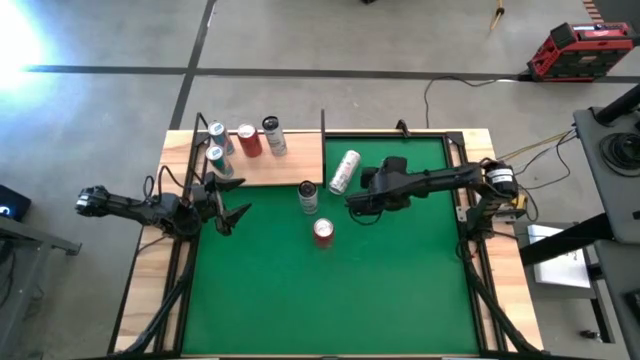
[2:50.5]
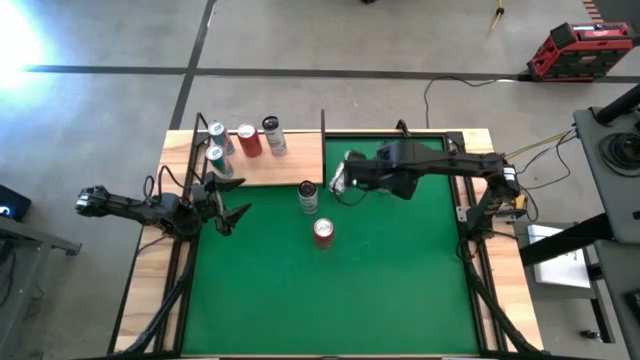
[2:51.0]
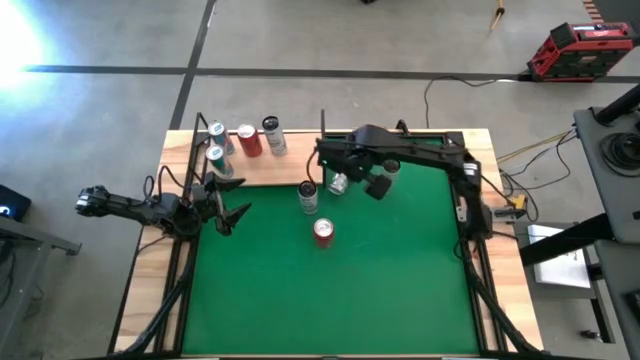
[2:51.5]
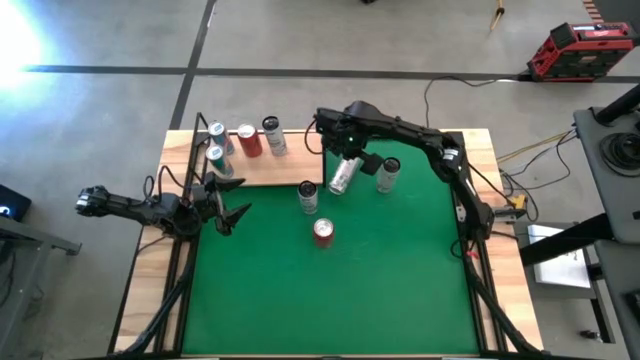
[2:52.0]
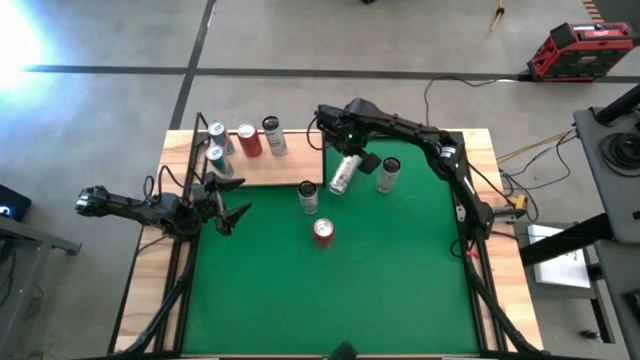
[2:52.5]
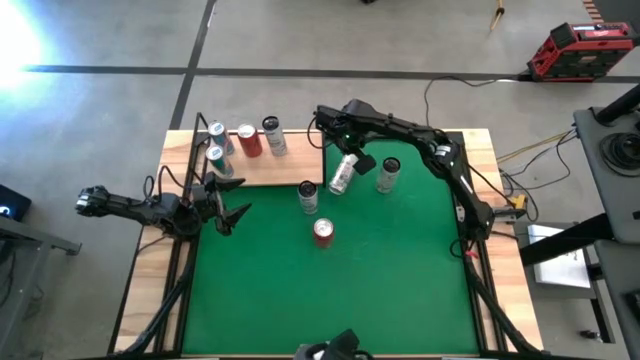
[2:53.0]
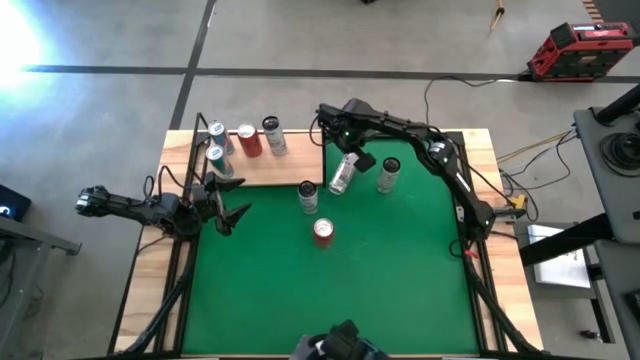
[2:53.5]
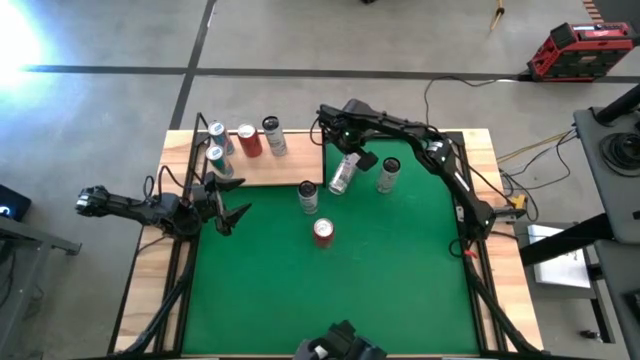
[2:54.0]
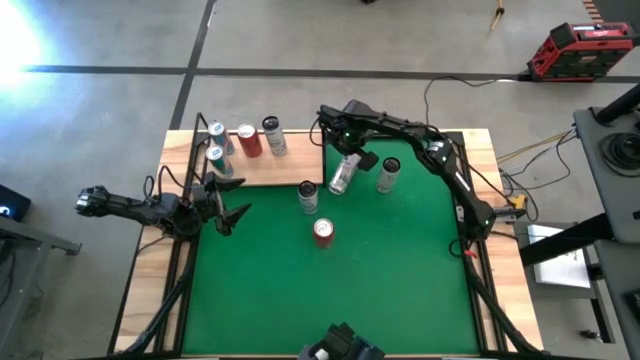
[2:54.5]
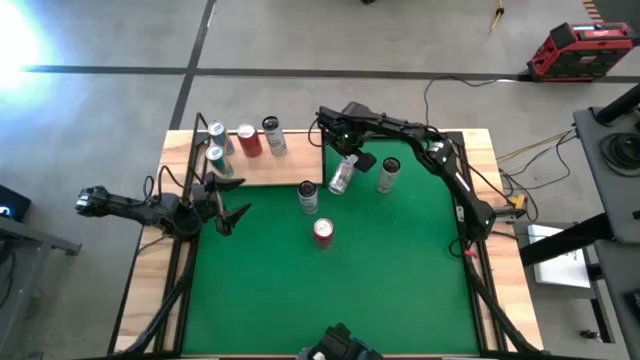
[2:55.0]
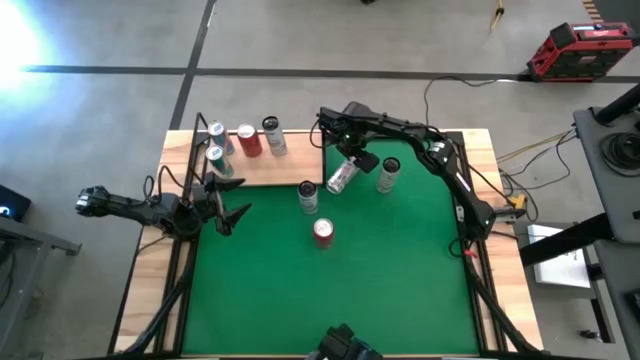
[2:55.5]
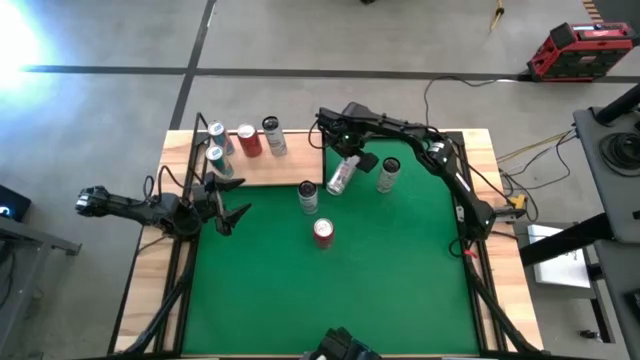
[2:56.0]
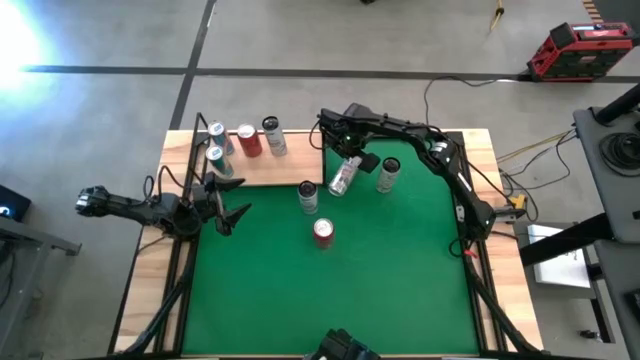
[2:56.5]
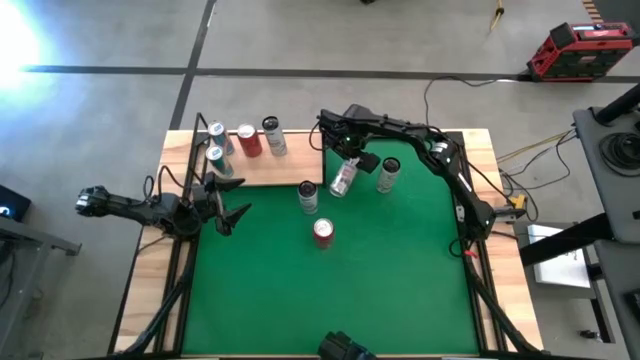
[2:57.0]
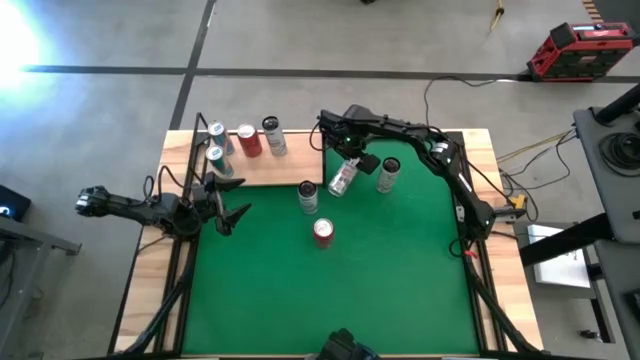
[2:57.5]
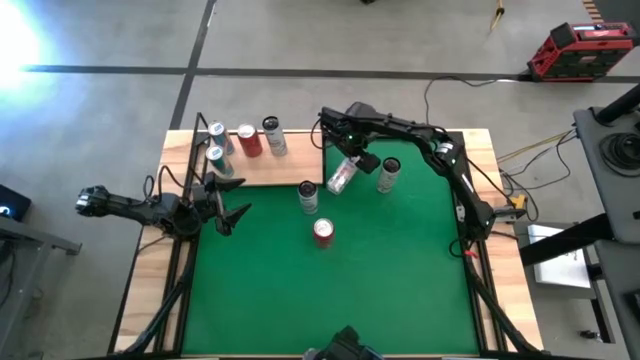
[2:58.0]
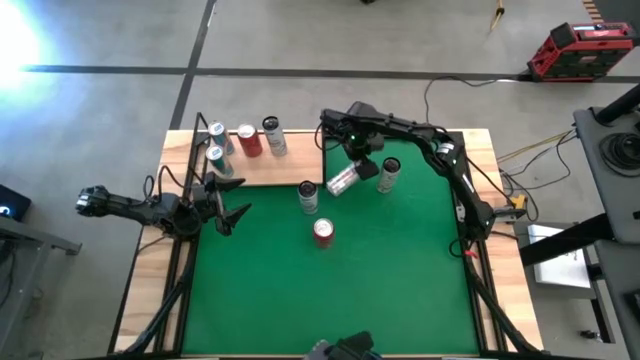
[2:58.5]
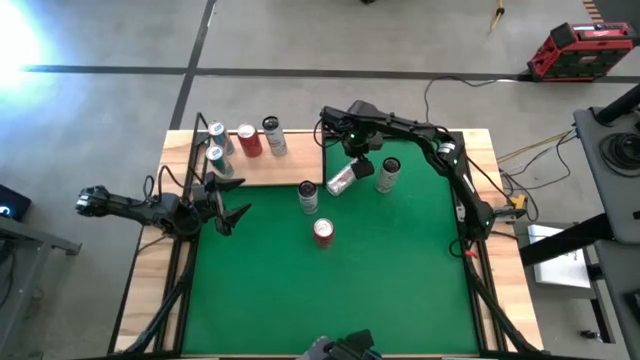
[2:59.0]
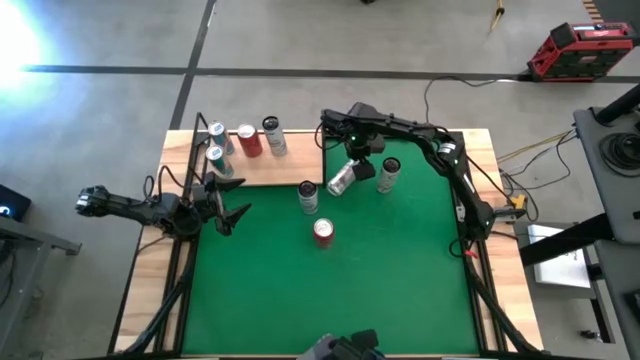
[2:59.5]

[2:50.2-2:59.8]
Task: Place canned beverage on shelf
Adjust the white yellow soda can on the table

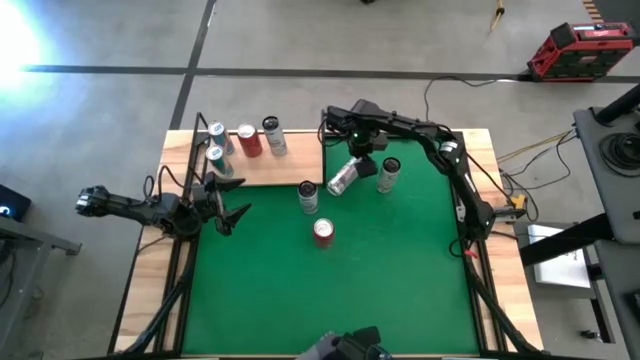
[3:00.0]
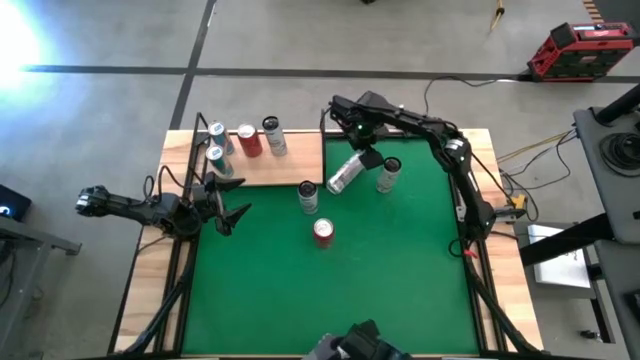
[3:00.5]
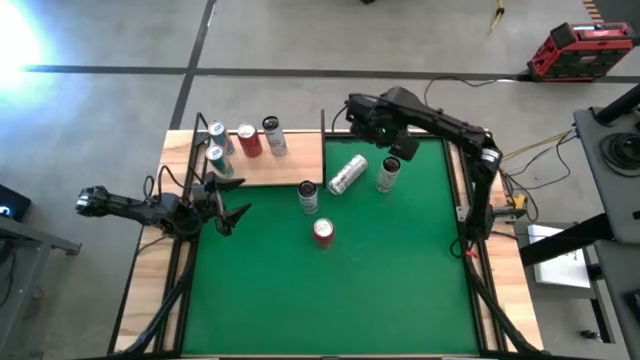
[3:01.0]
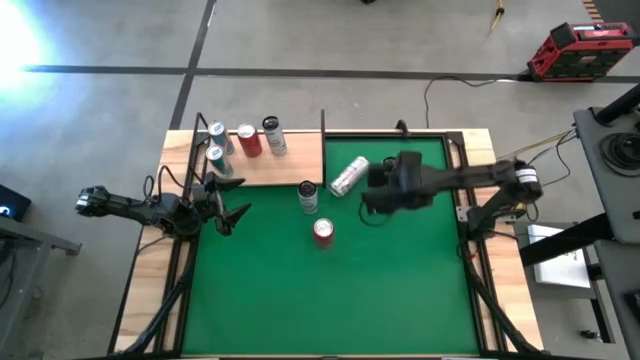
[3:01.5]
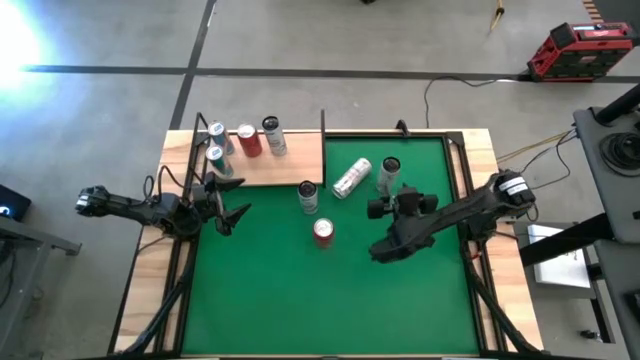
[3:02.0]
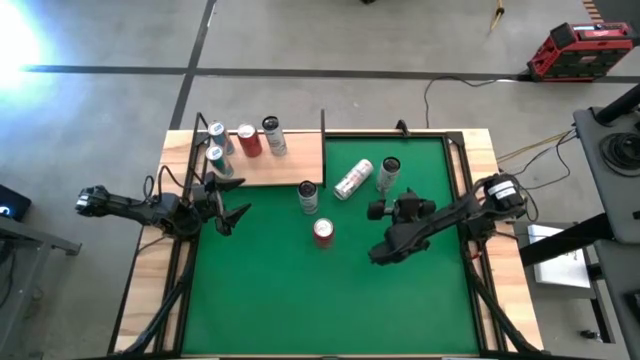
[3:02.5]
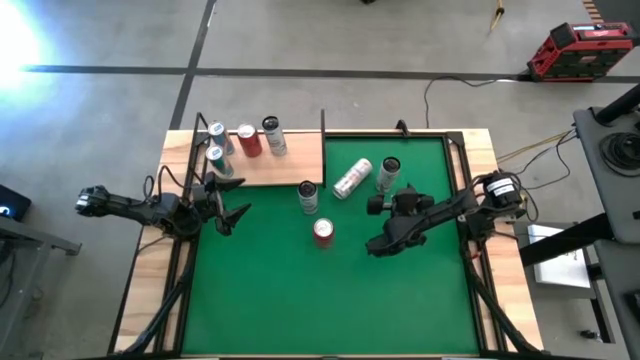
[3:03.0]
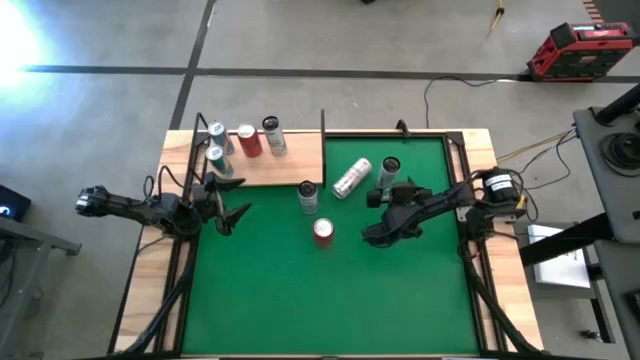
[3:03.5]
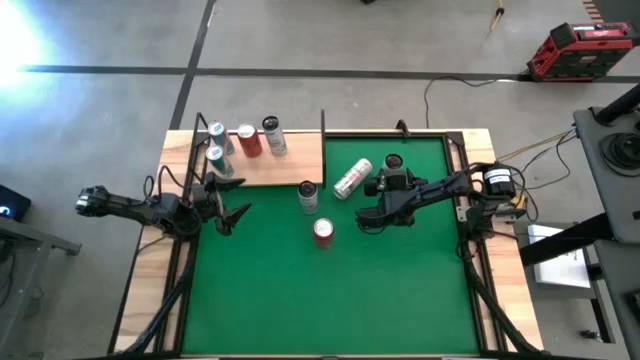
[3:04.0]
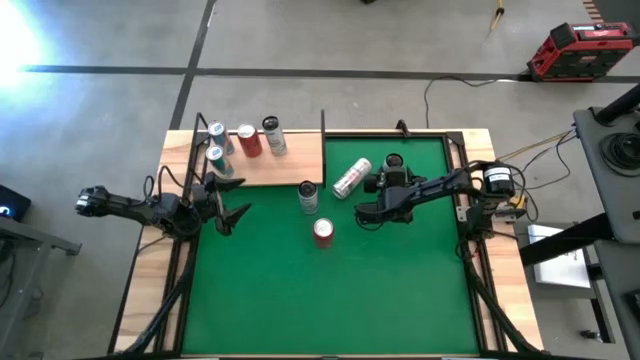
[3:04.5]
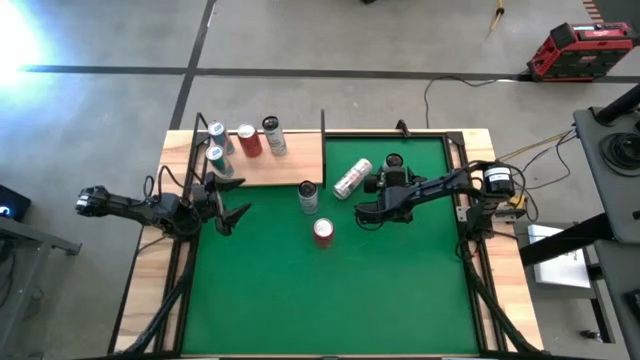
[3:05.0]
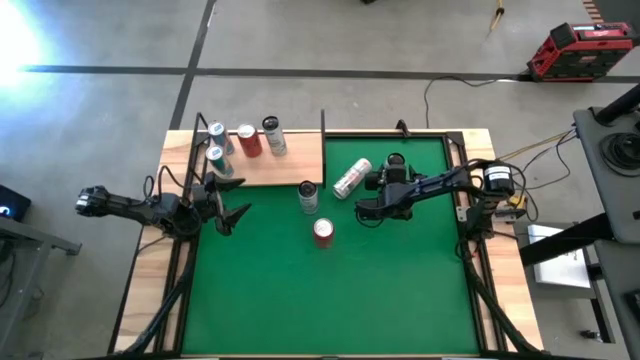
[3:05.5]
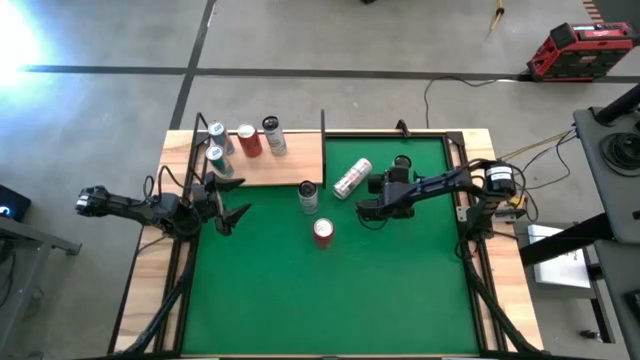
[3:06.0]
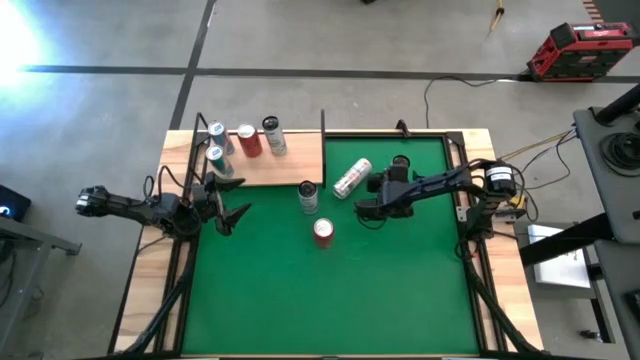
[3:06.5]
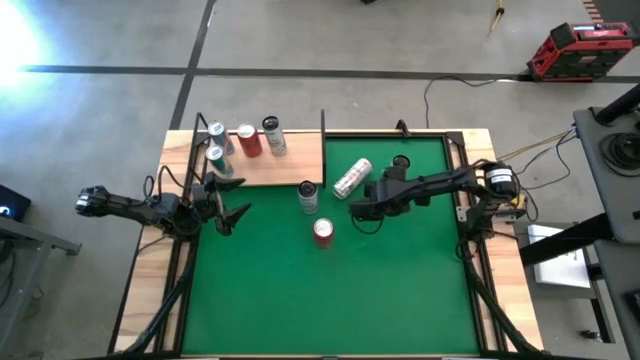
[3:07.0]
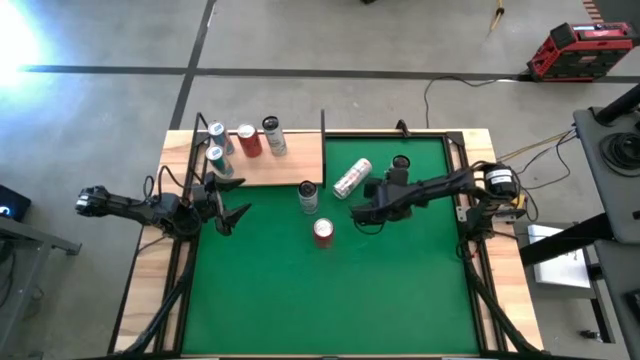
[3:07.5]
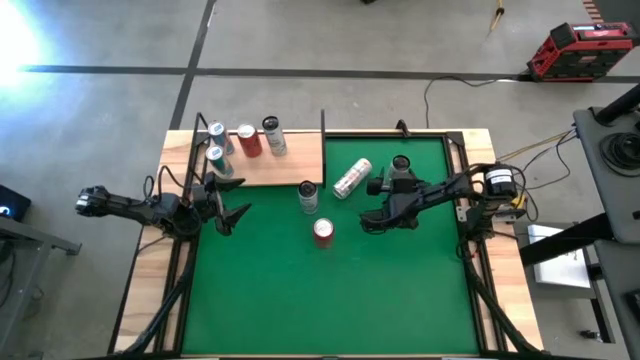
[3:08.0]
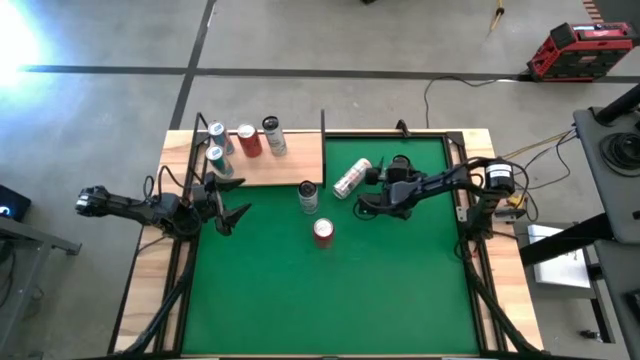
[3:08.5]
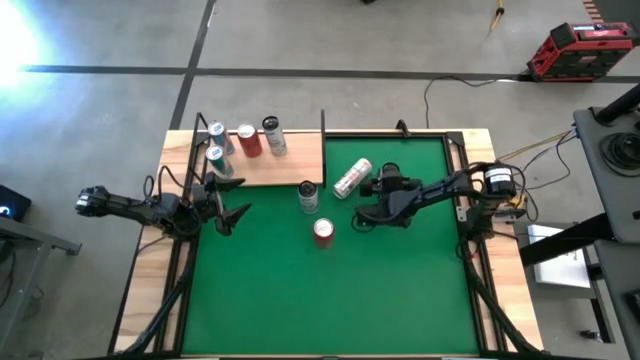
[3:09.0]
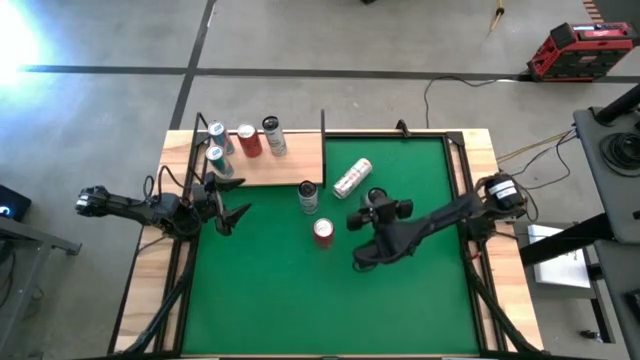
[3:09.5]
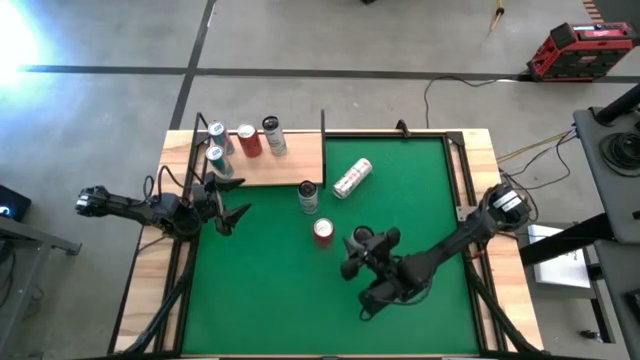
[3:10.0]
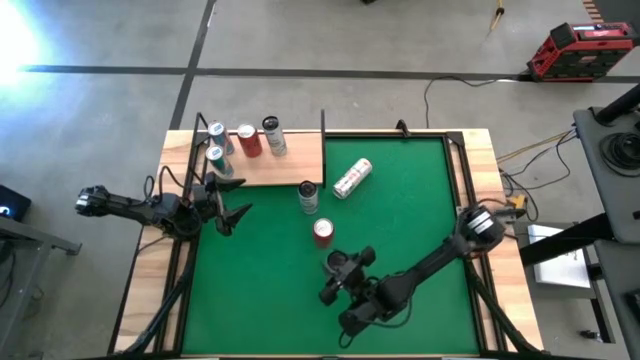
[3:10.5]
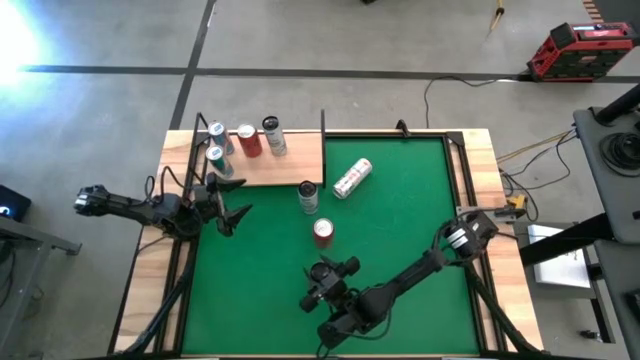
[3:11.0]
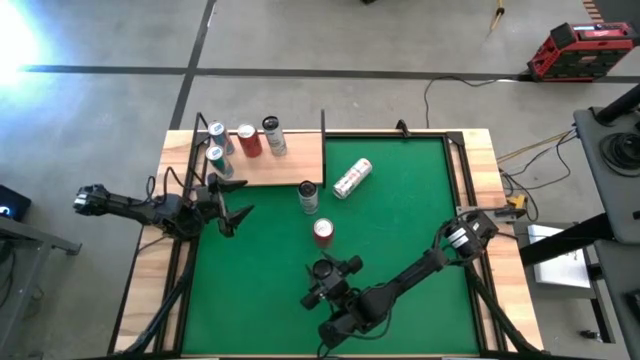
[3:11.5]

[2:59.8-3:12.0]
Move the white yellow soda can to the center
